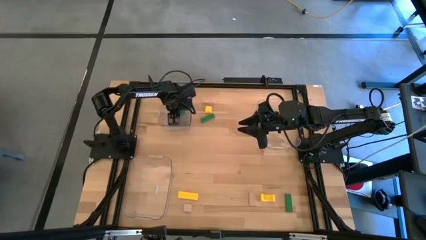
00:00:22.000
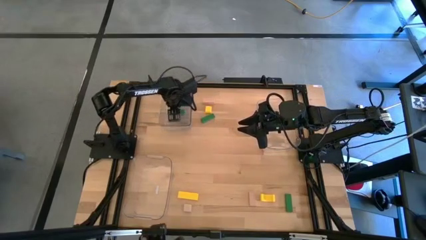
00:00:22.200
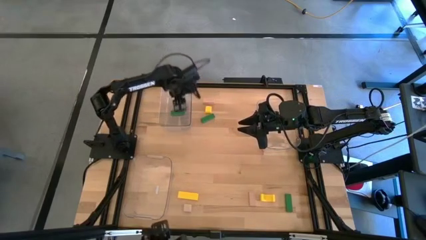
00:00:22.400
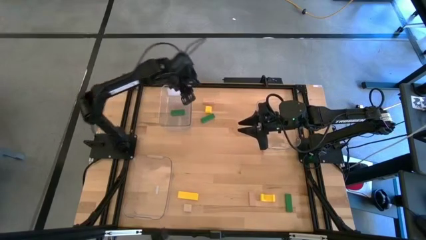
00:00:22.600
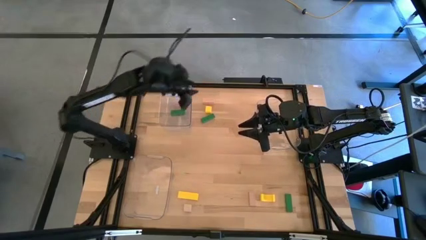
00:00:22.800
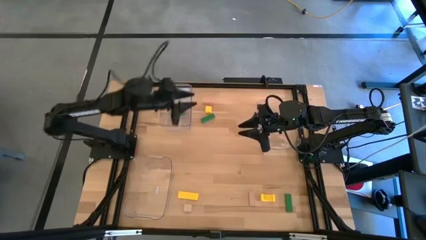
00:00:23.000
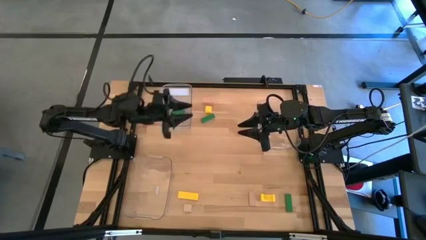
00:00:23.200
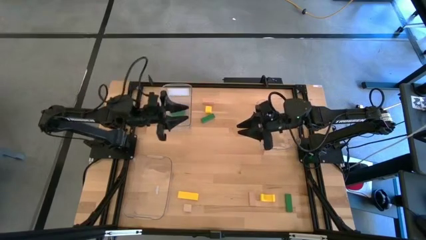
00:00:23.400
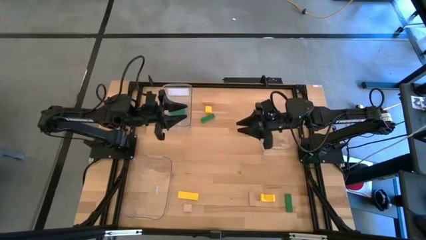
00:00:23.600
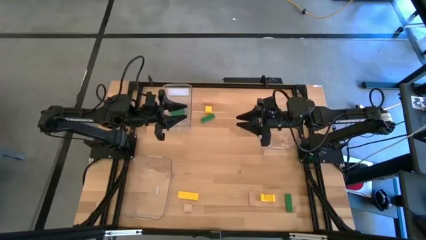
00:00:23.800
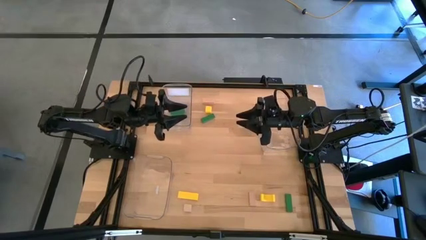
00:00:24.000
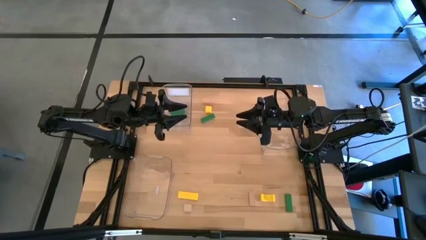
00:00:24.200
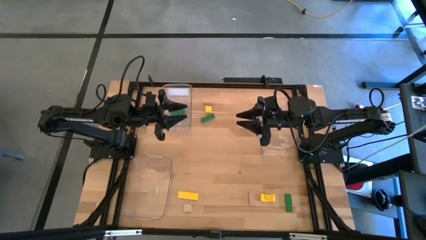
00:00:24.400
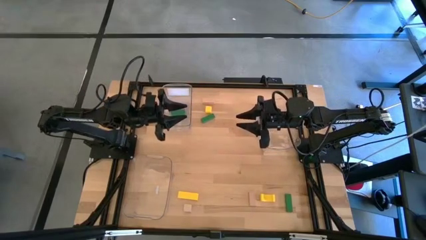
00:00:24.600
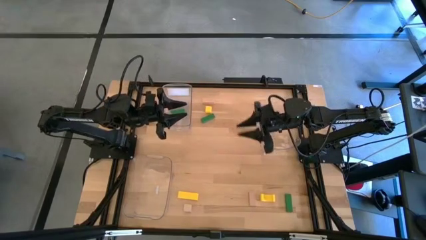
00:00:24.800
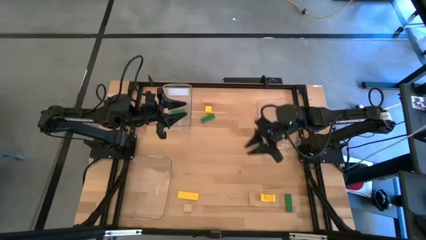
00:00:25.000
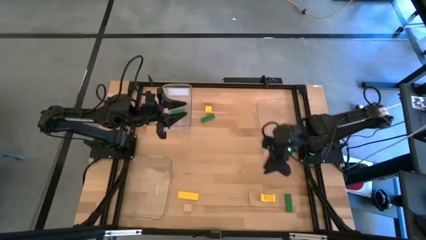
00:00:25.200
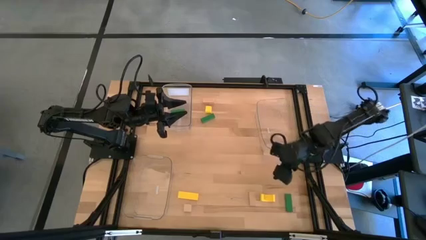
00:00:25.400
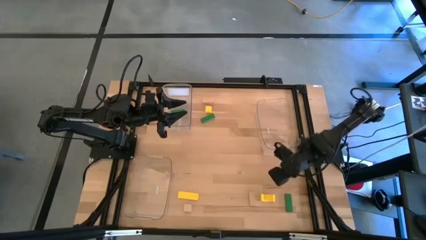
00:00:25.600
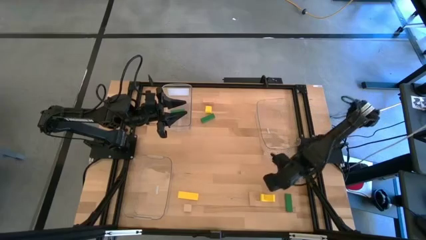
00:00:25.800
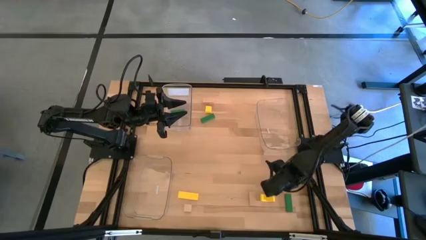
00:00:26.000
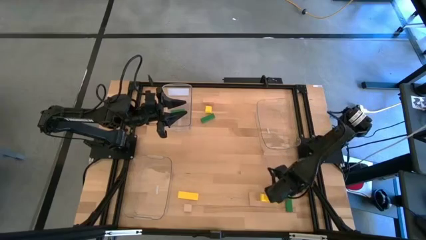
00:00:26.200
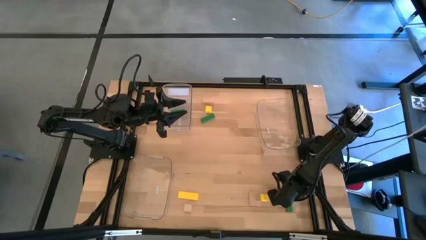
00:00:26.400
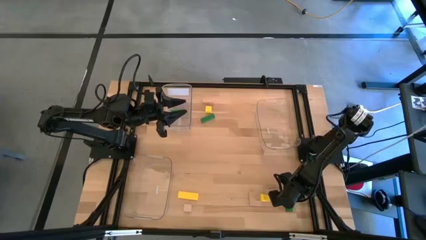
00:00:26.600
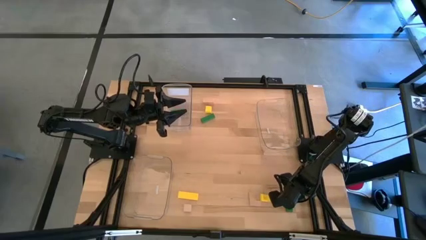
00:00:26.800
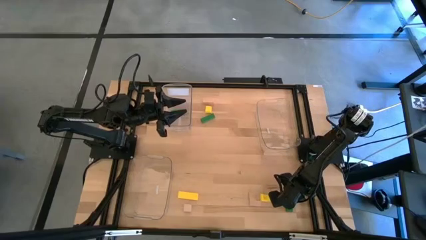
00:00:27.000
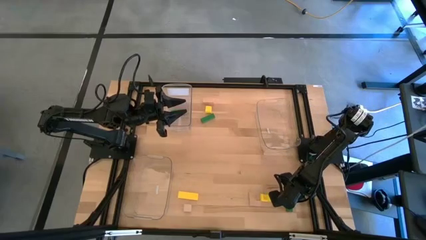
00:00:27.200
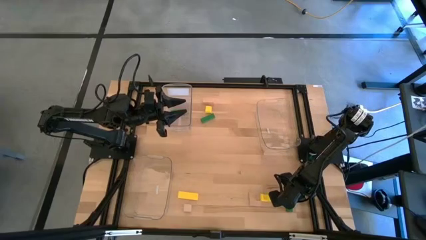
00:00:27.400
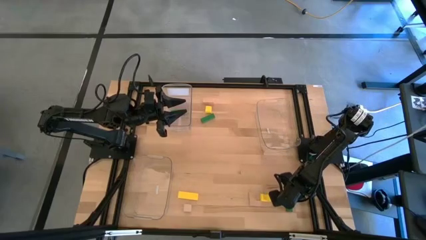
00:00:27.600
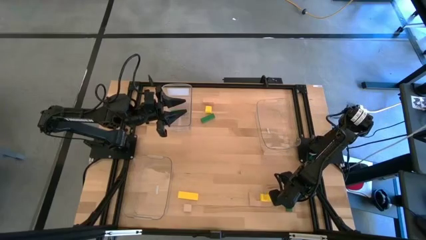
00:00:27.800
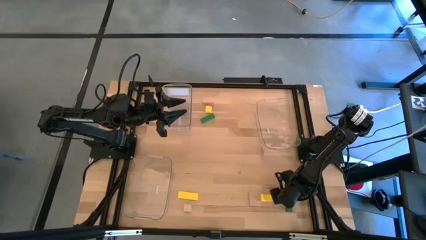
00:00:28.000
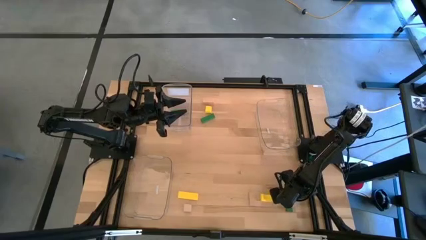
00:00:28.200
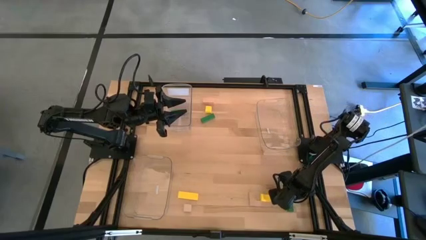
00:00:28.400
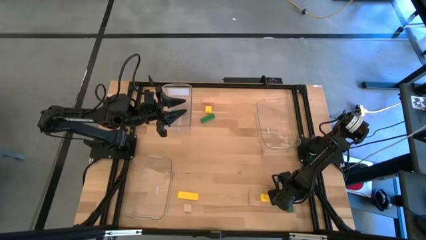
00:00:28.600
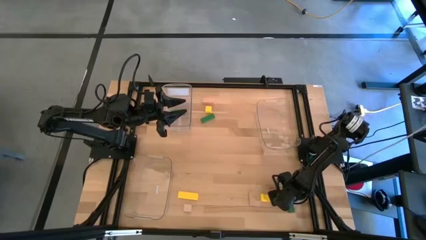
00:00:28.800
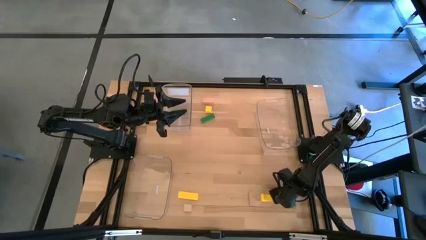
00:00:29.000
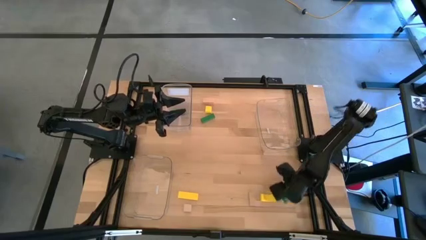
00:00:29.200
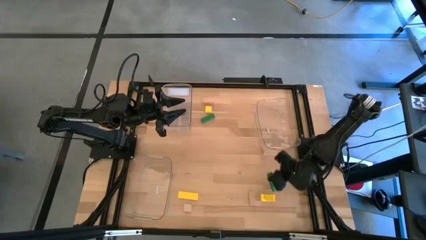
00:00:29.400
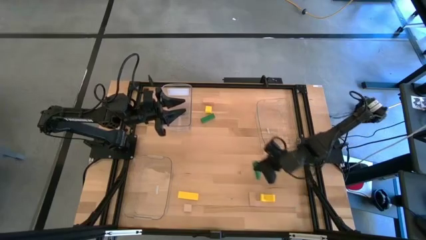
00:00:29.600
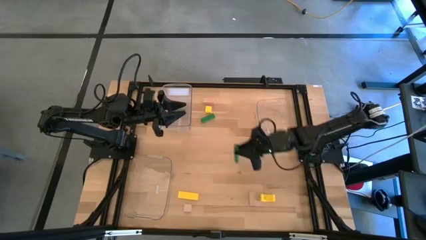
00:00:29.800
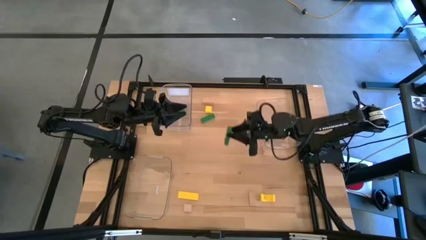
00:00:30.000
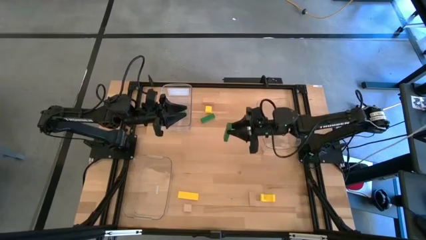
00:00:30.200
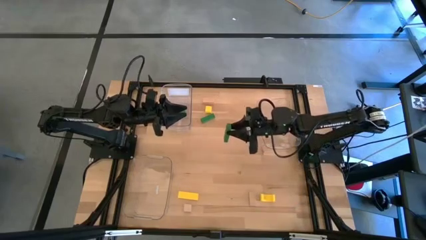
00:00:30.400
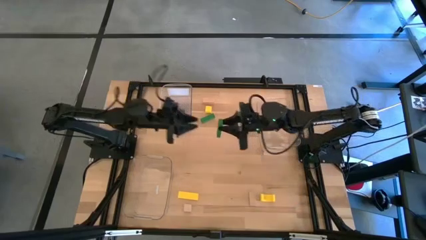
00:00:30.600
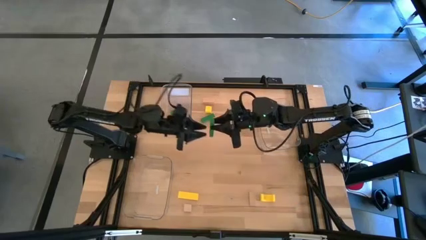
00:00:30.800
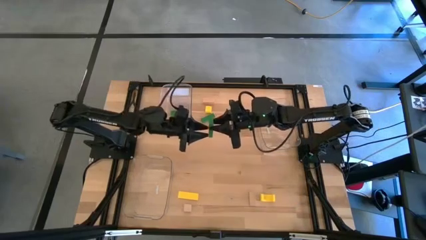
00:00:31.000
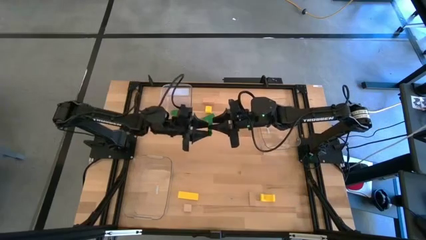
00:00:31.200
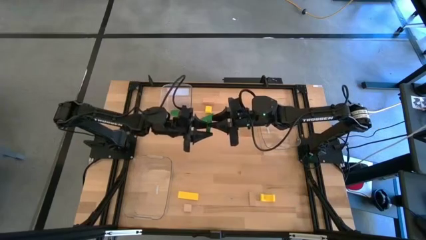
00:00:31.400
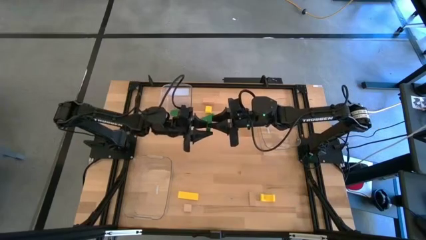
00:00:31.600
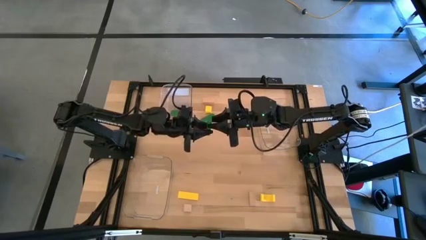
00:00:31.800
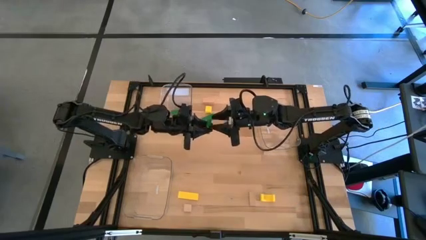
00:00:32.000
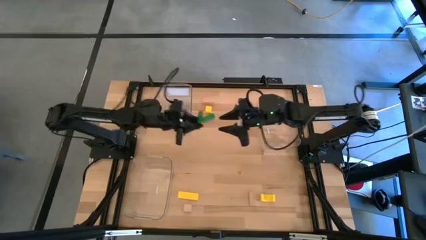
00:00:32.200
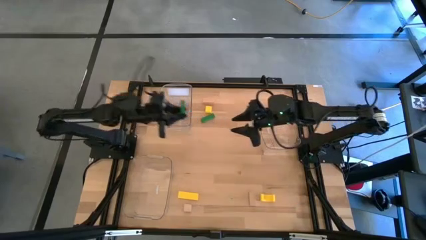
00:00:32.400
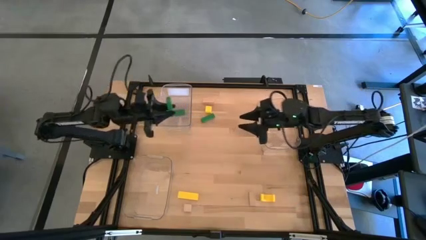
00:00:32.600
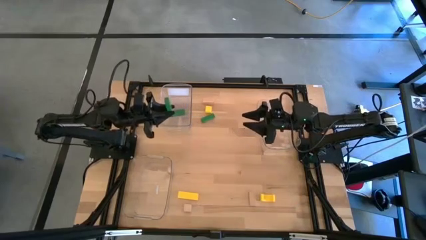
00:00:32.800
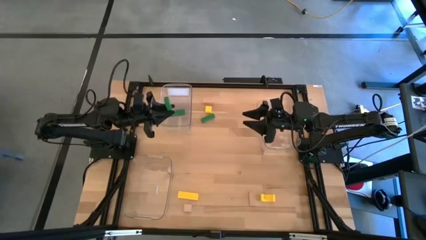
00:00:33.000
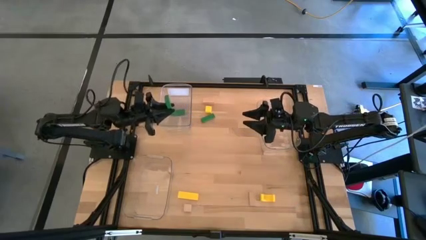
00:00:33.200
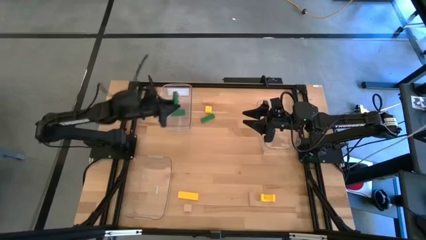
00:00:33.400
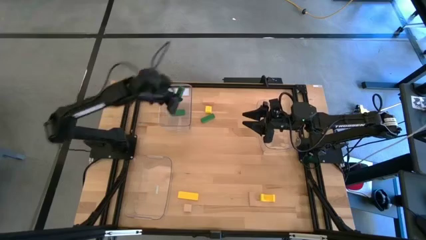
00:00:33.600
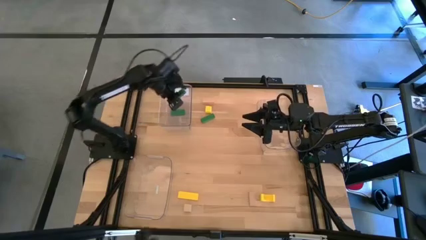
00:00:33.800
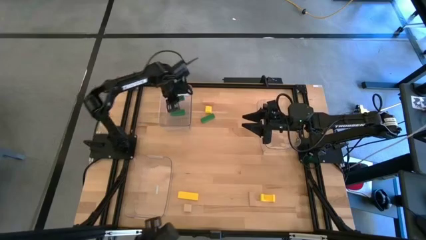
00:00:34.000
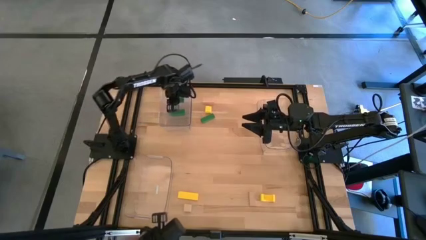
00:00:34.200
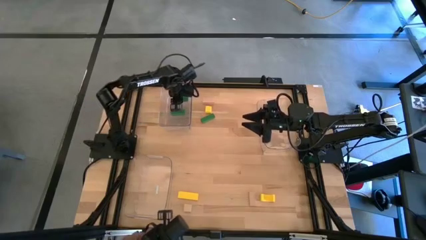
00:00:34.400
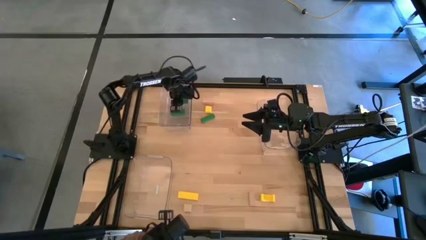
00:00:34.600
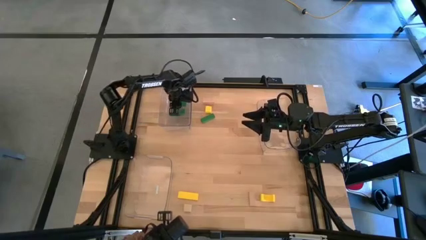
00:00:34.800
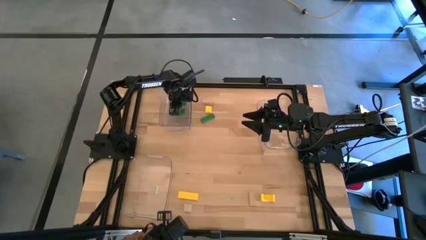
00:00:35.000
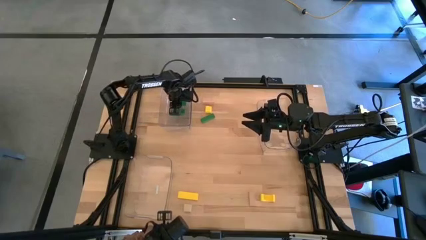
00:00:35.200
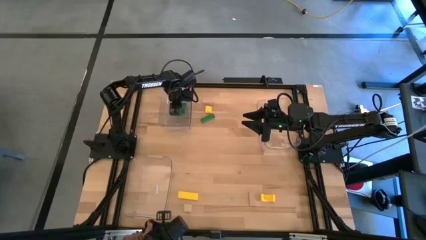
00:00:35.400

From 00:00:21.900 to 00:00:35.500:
Task: Sort & place blocks by color
Put the bottom green block into the top left transparent bin
